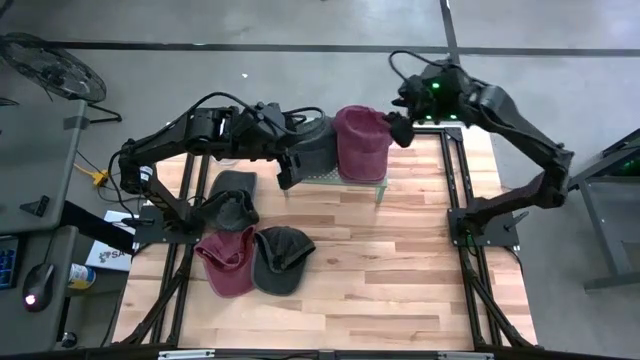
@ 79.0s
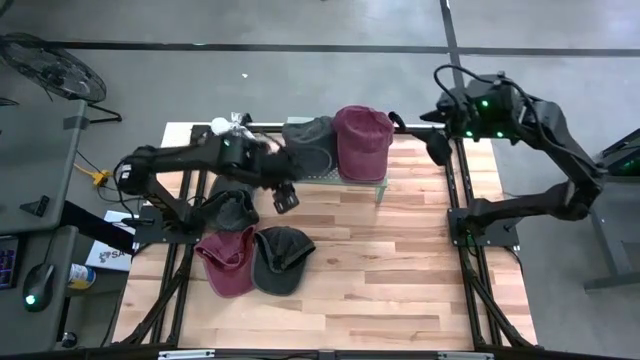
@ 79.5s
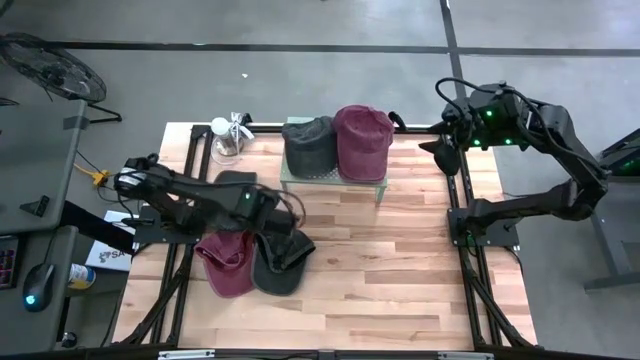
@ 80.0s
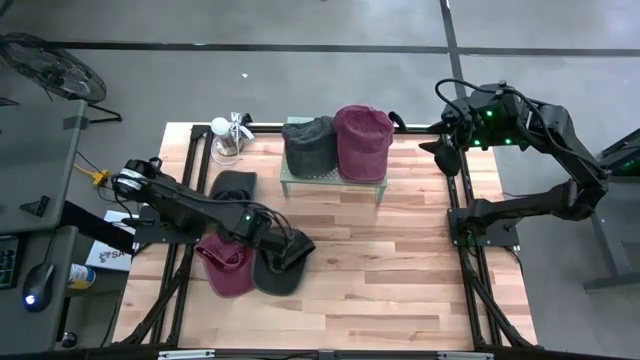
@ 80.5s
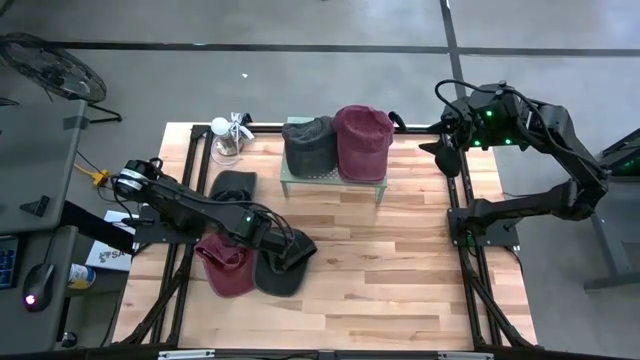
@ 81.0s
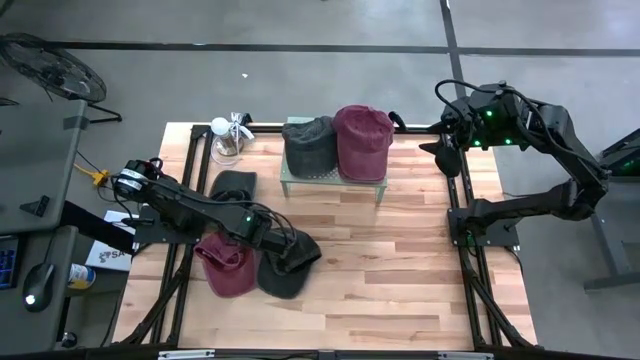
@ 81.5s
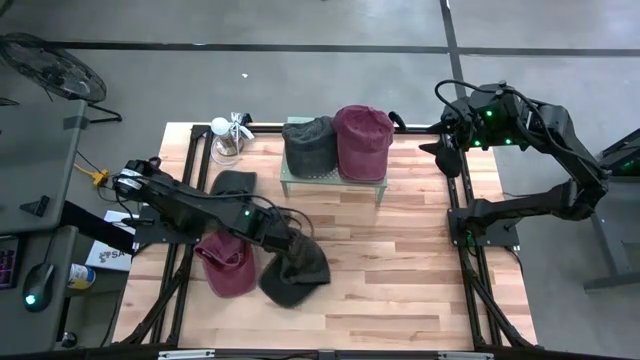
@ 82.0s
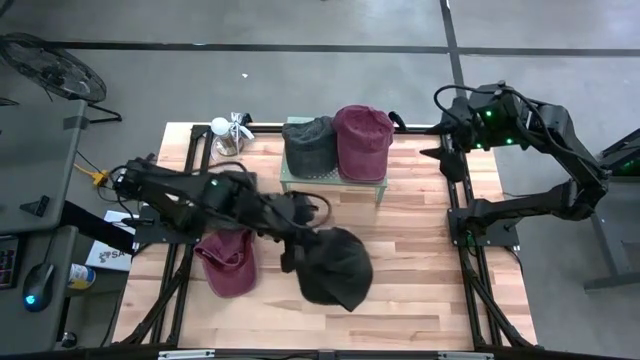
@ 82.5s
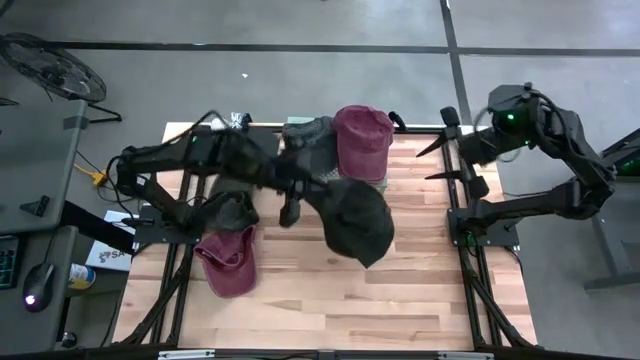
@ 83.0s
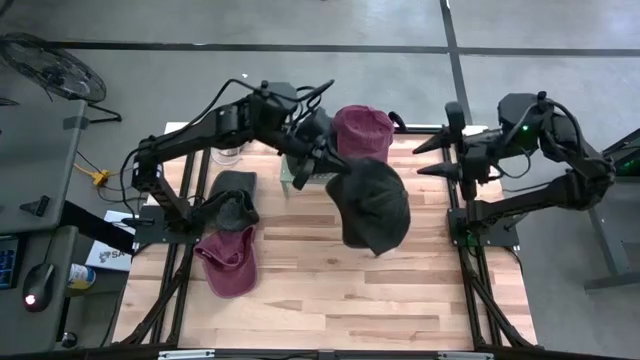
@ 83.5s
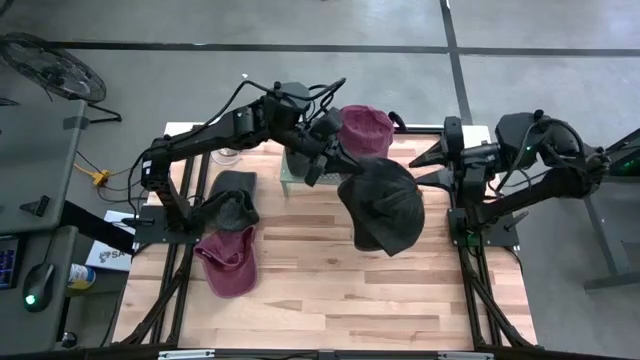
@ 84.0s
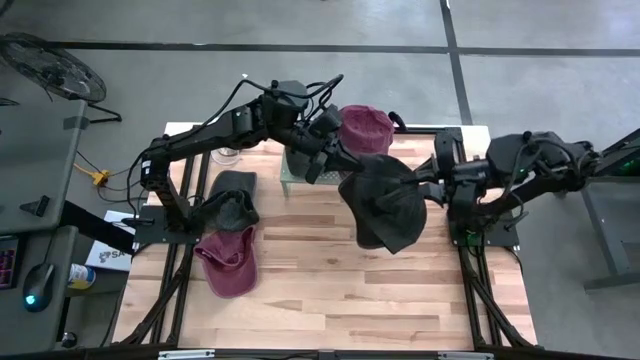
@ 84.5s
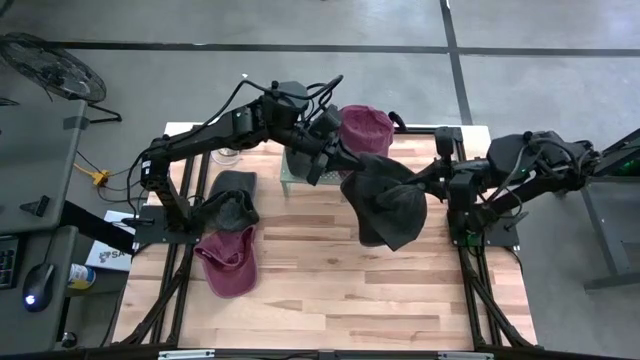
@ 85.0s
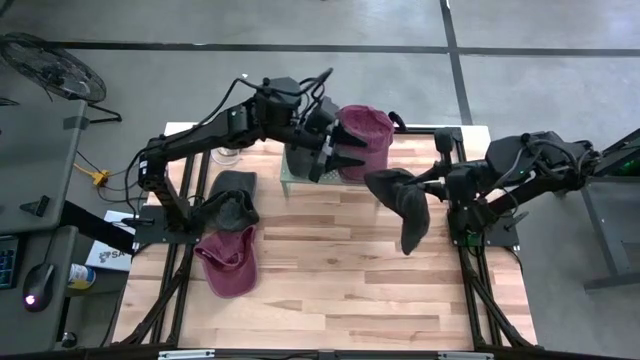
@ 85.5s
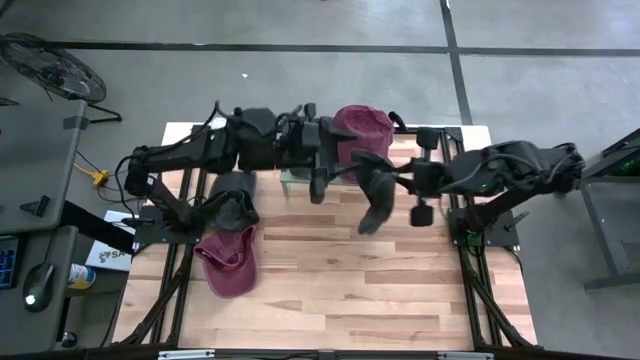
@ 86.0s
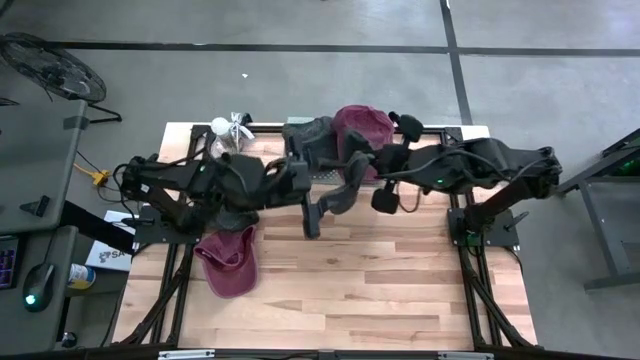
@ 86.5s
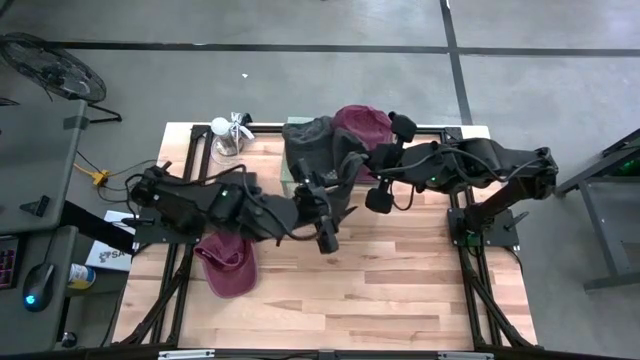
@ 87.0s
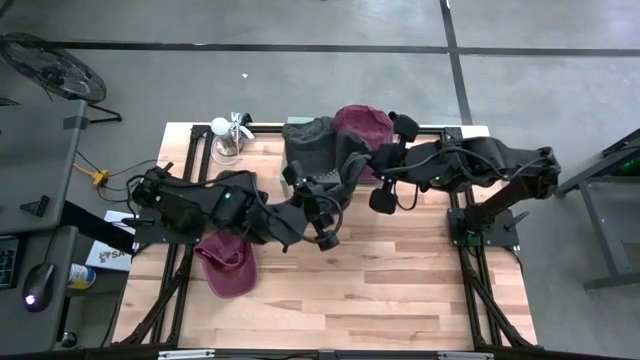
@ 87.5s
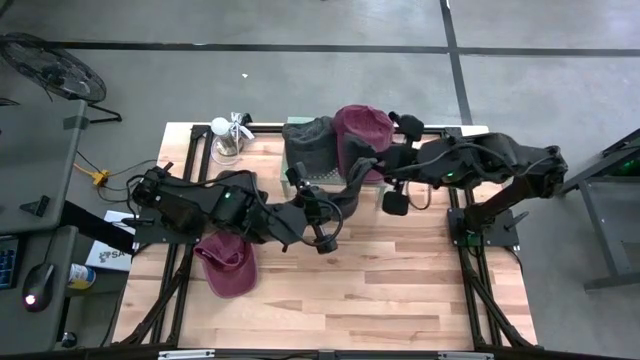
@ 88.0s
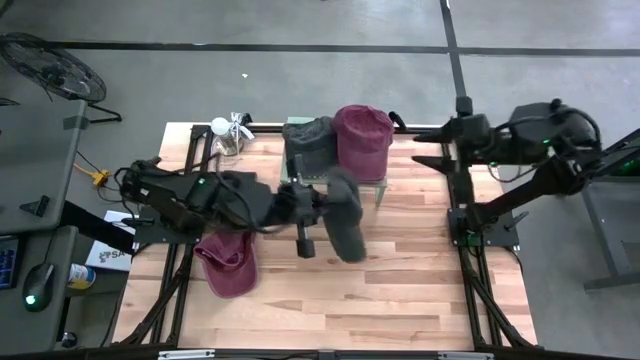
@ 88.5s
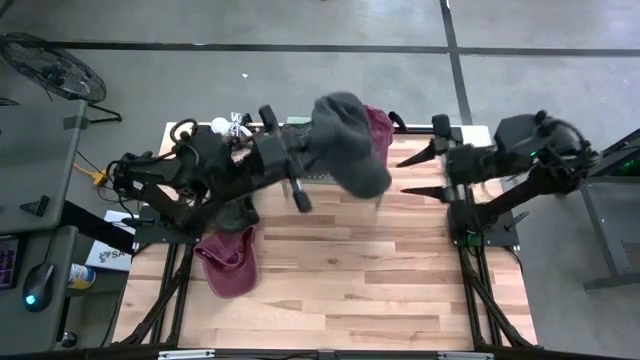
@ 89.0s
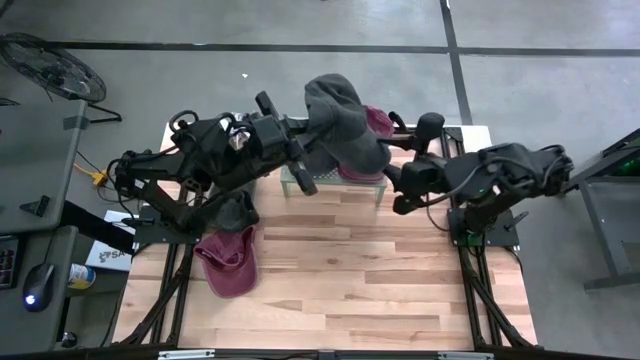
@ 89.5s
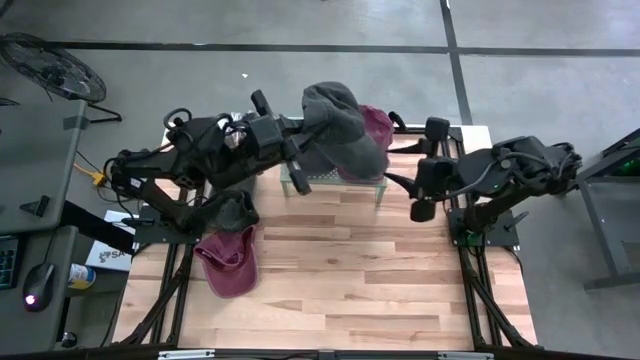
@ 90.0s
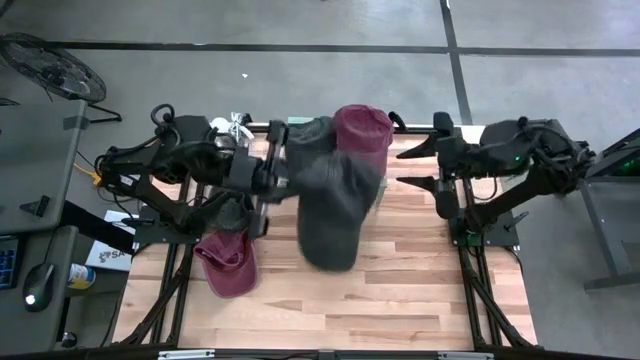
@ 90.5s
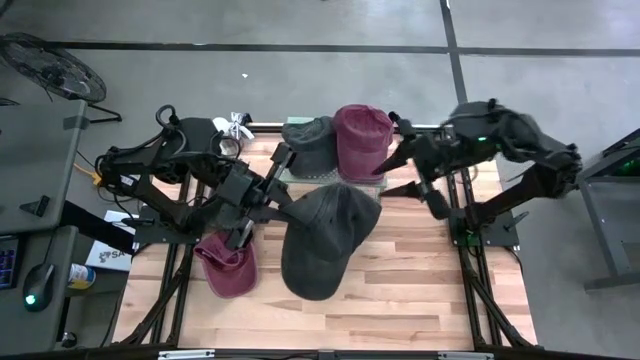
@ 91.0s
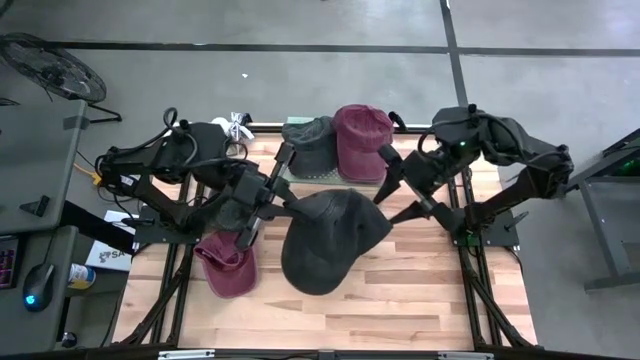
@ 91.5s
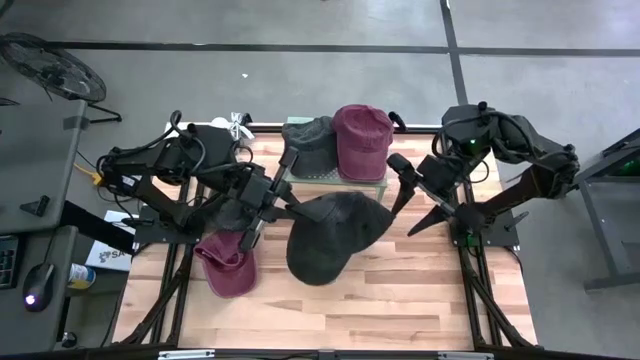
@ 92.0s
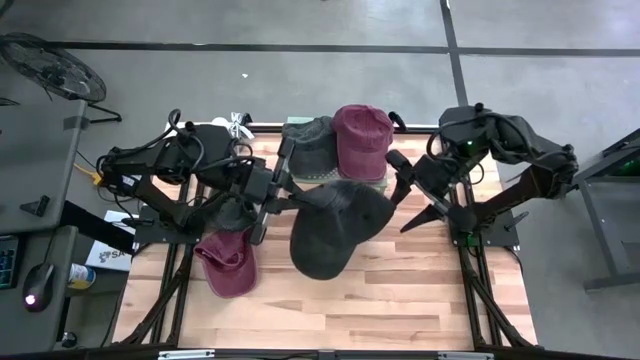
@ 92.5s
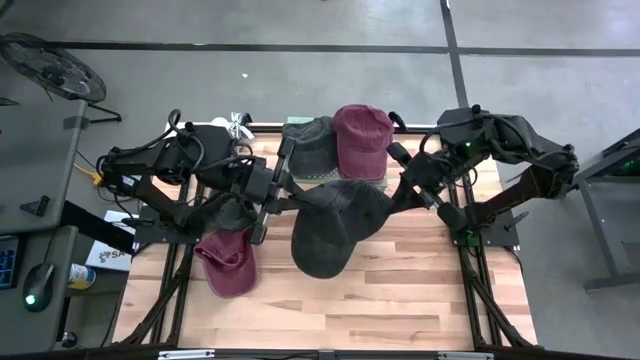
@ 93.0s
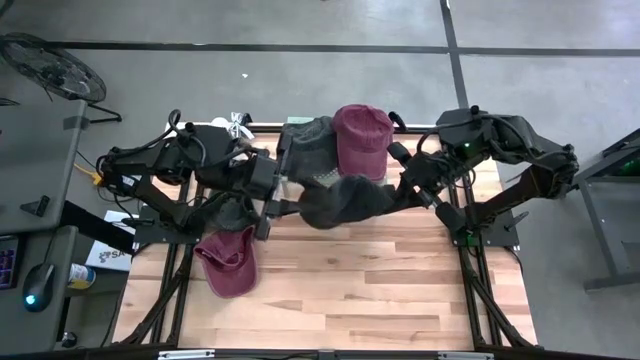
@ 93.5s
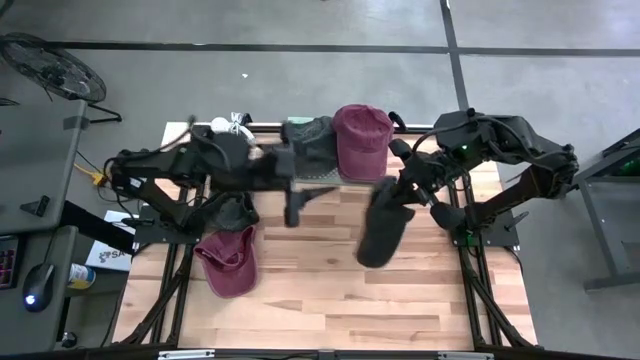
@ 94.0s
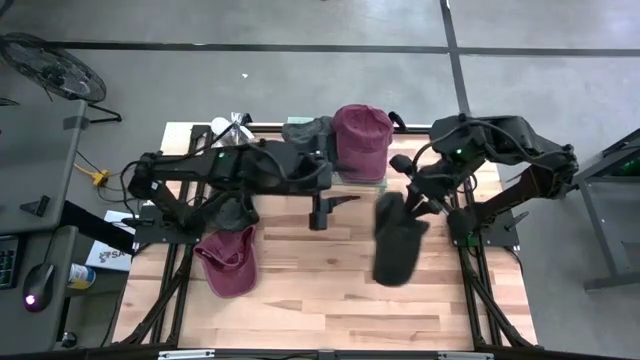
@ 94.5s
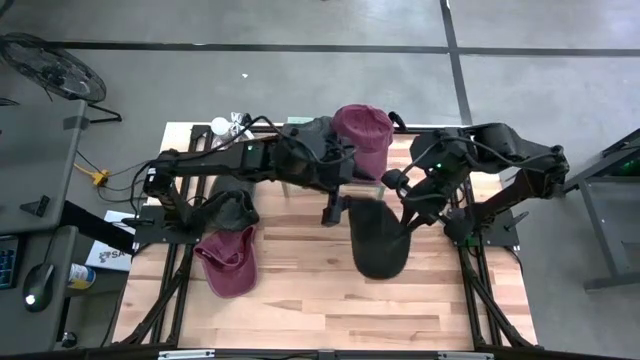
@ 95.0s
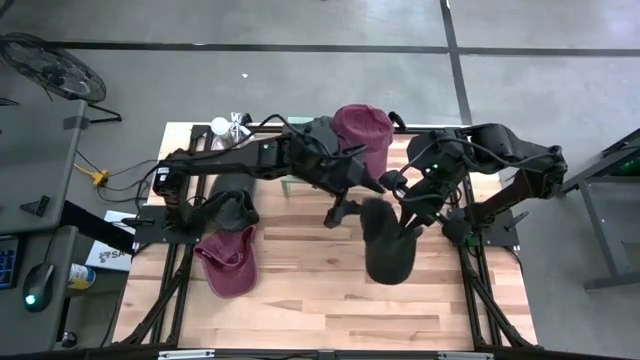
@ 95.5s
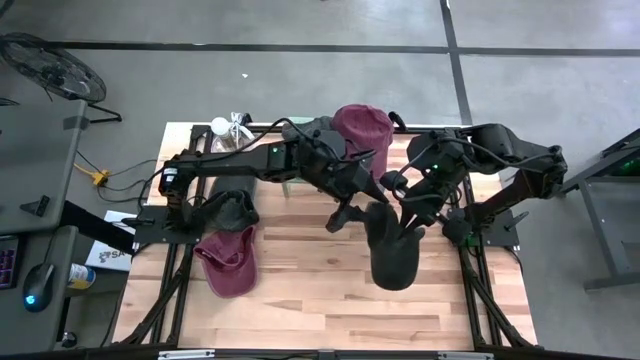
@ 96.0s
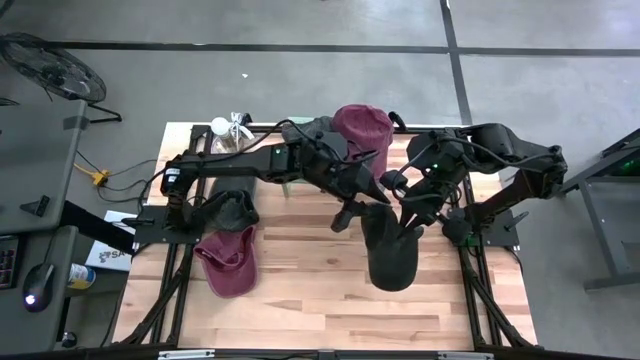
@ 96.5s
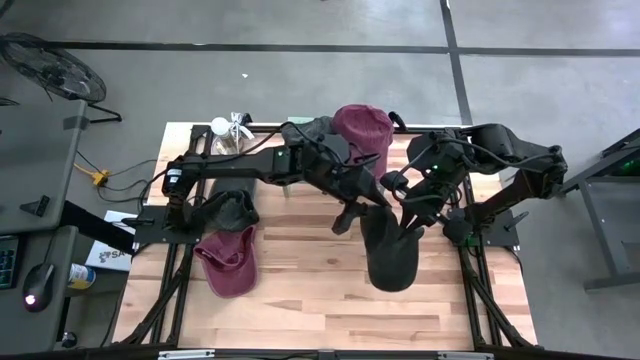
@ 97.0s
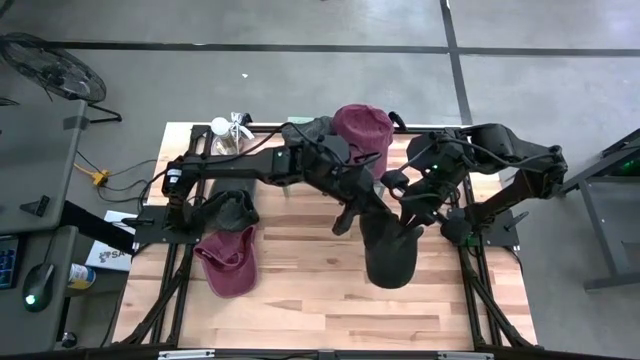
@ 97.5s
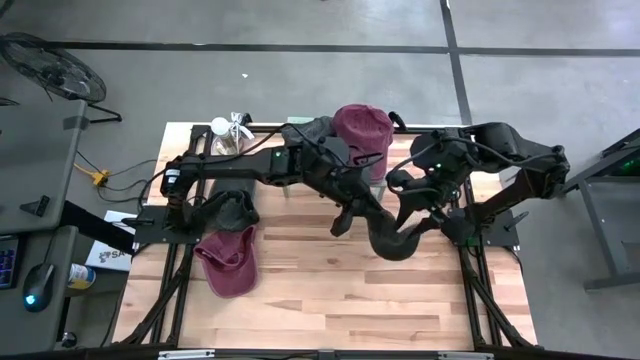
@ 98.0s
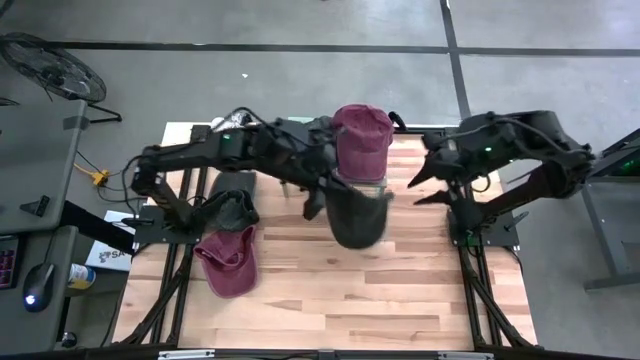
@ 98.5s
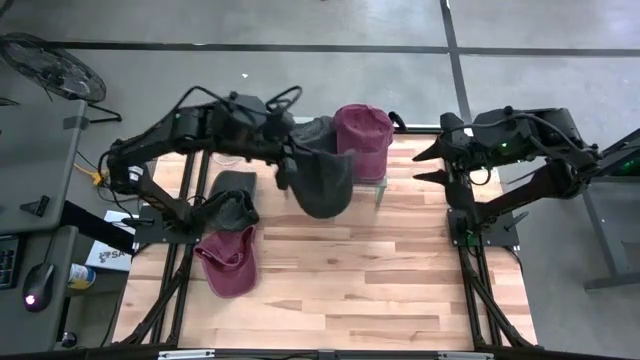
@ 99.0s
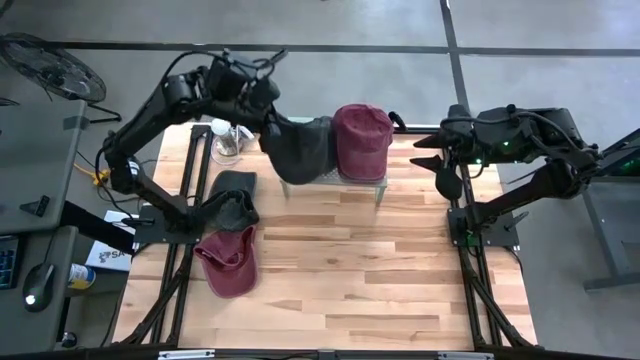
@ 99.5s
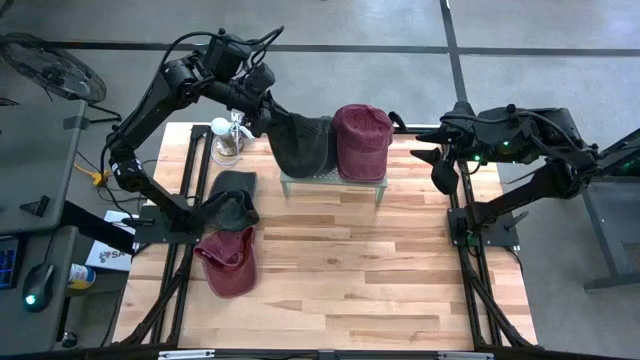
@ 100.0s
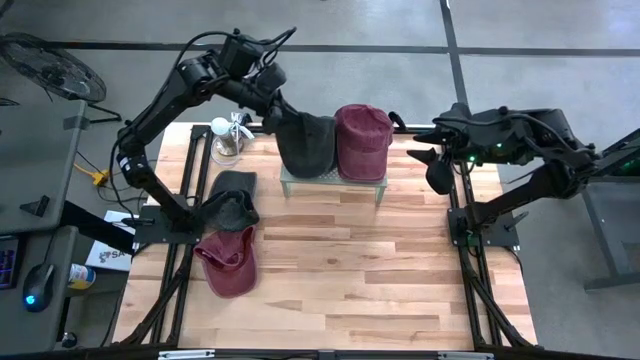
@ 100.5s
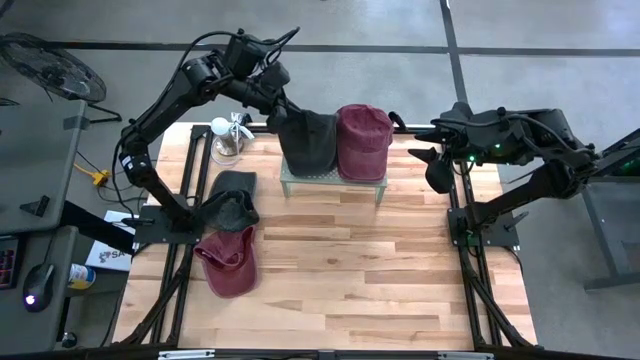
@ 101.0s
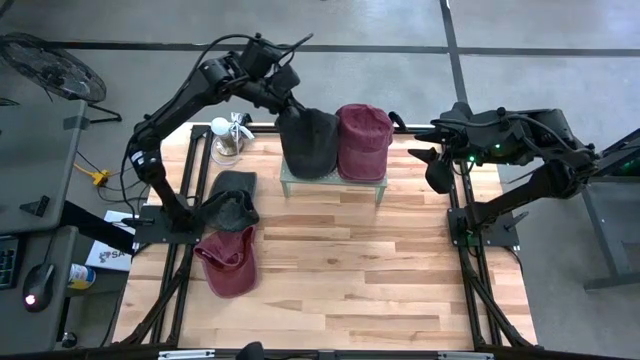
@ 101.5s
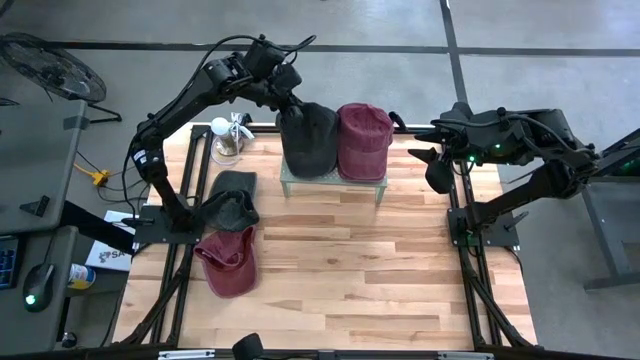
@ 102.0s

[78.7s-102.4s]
Task: Pick & Place hat
Stack the bottom black cap on the other black cap on the shelf
